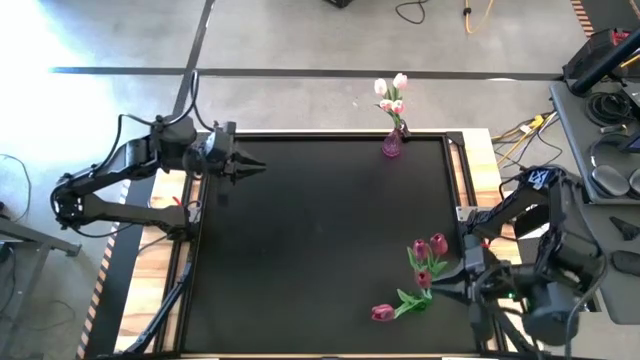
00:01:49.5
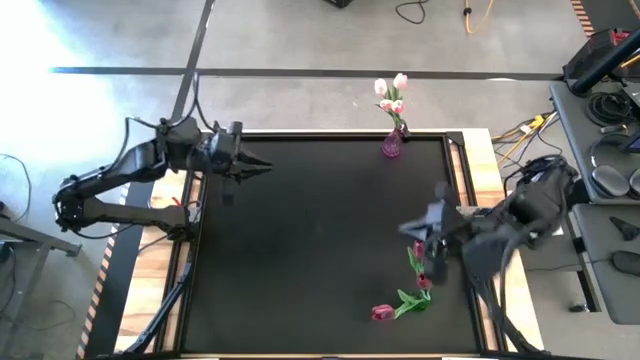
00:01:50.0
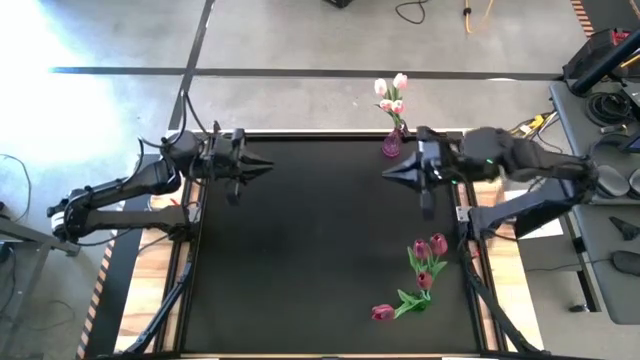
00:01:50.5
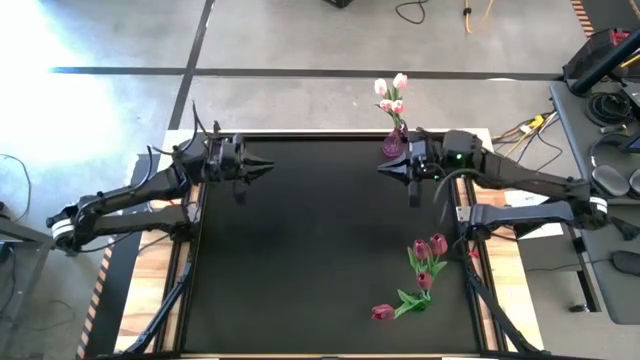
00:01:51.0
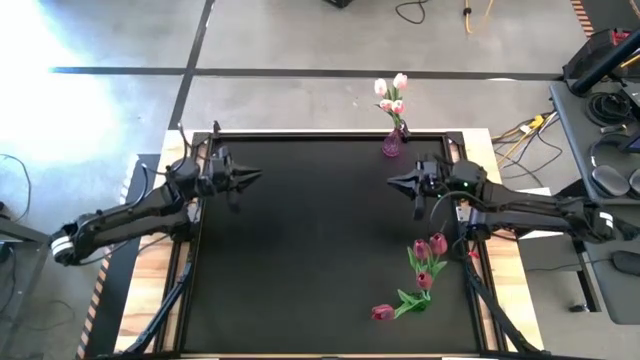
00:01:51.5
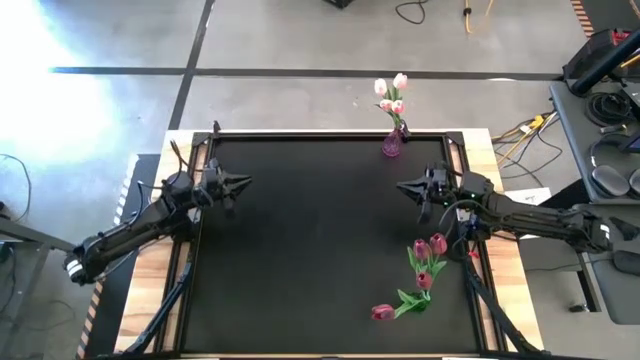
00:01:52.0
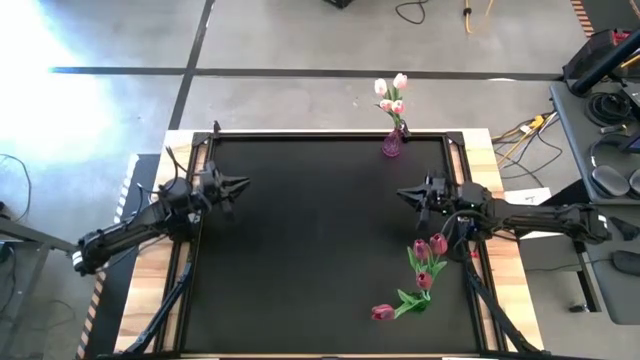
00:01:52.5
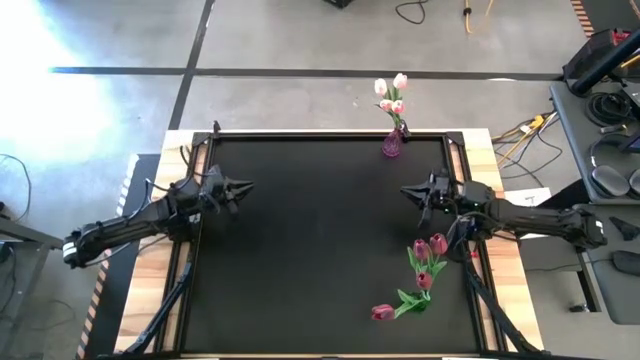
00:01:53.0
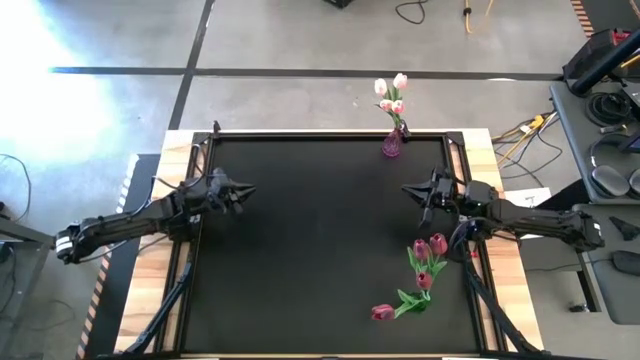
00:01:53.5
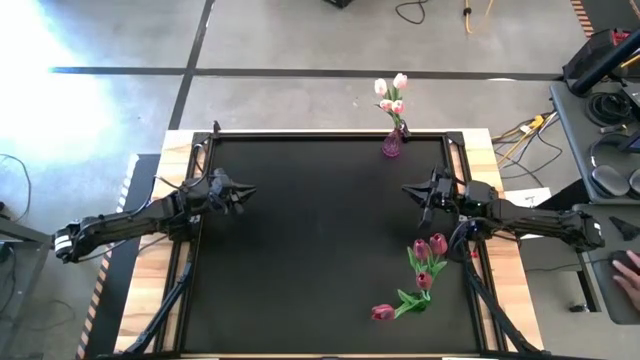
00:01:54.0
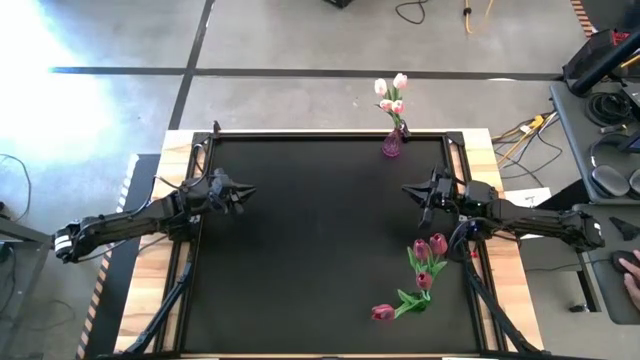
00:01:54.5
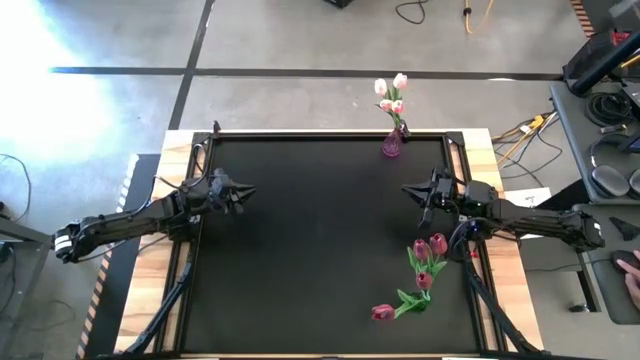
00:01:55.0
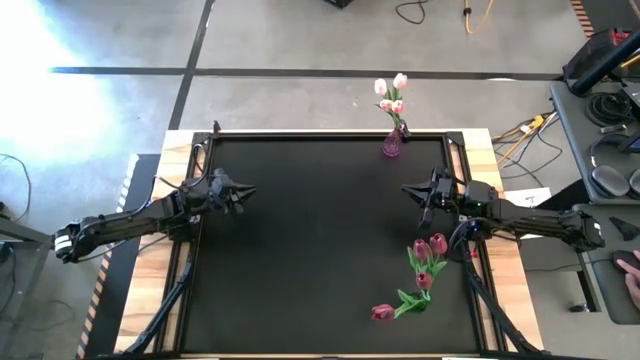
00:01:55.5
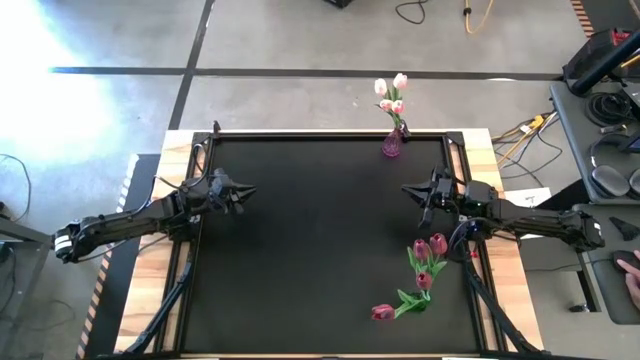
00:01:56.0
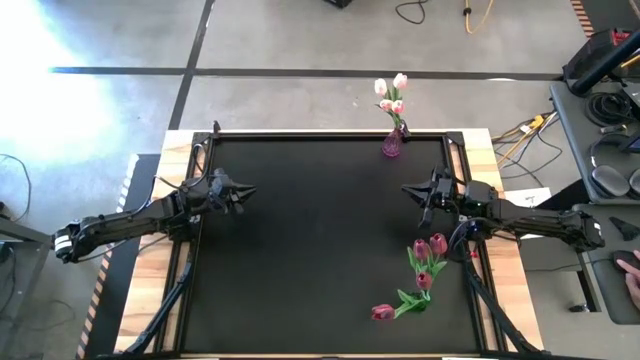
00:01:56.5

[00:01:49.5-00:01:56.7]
Task: Sort flowers into vase by color
Return to Home Position

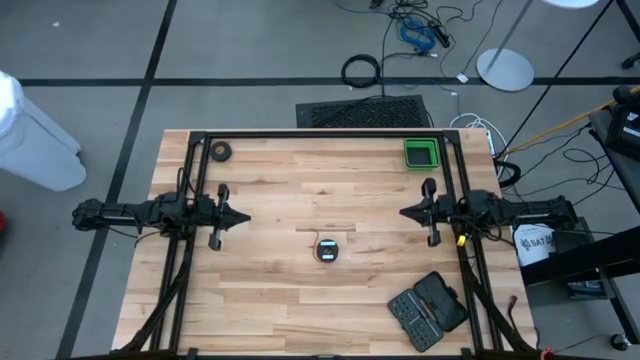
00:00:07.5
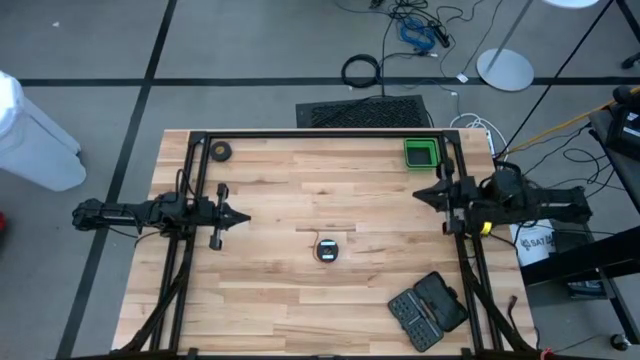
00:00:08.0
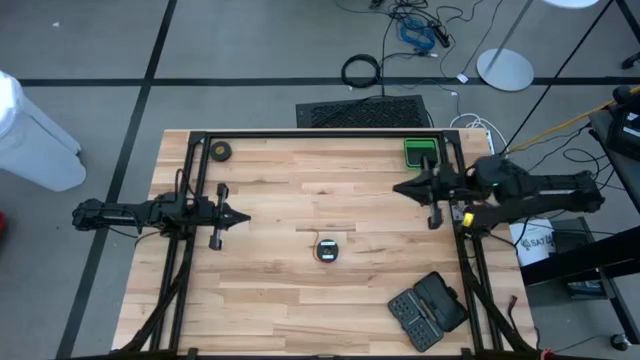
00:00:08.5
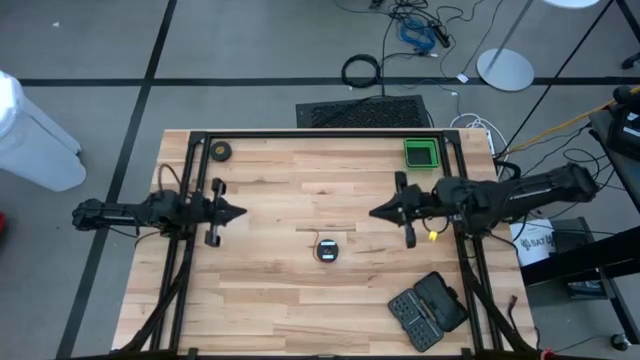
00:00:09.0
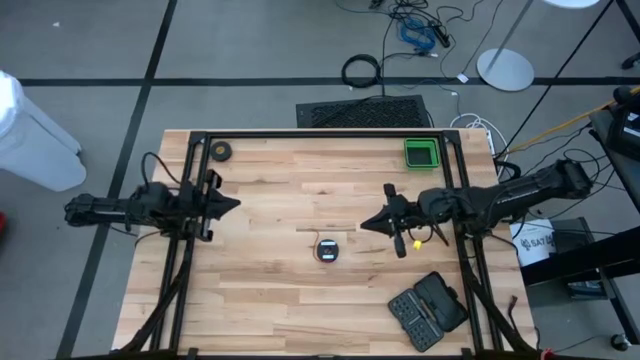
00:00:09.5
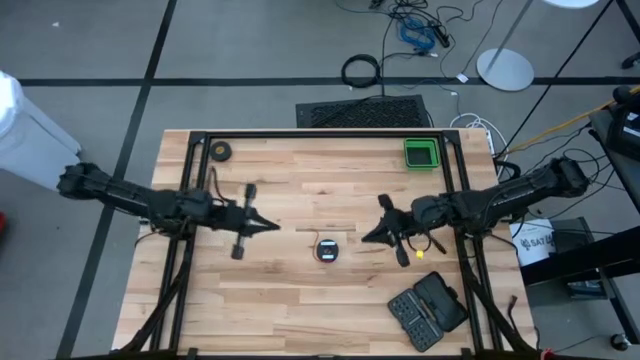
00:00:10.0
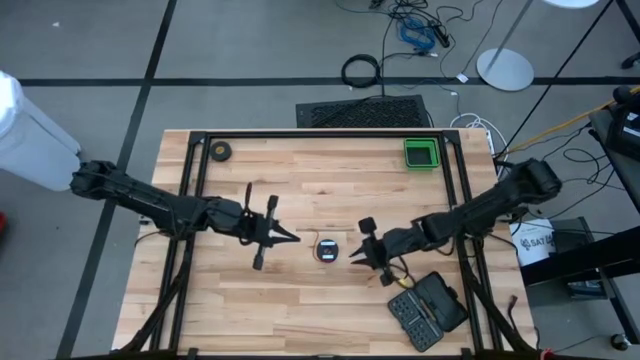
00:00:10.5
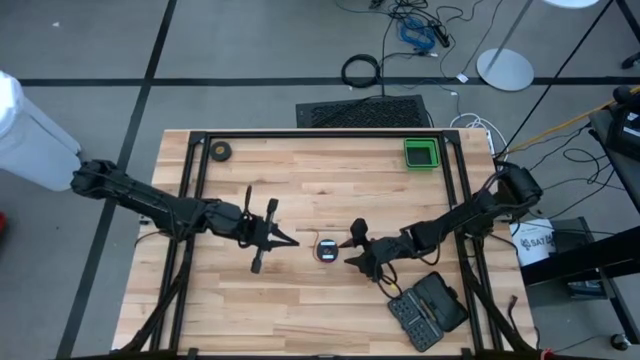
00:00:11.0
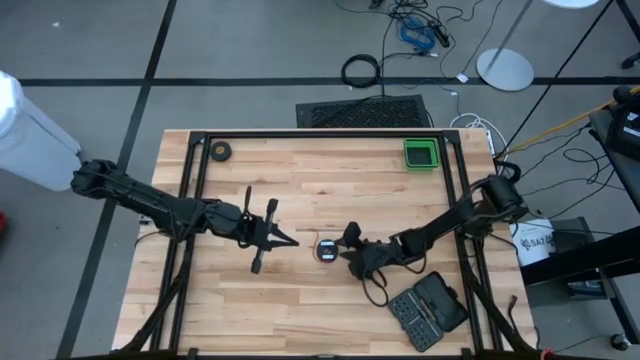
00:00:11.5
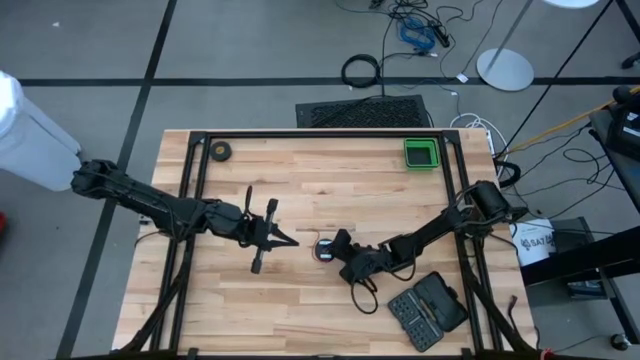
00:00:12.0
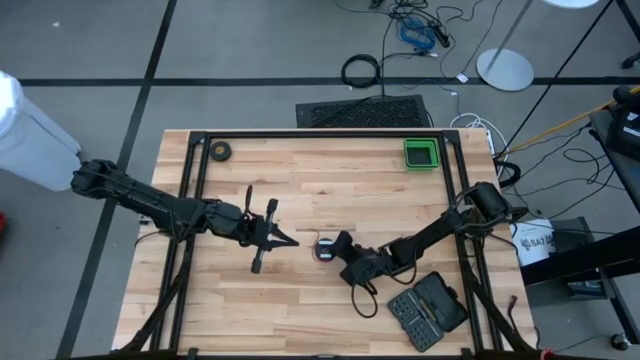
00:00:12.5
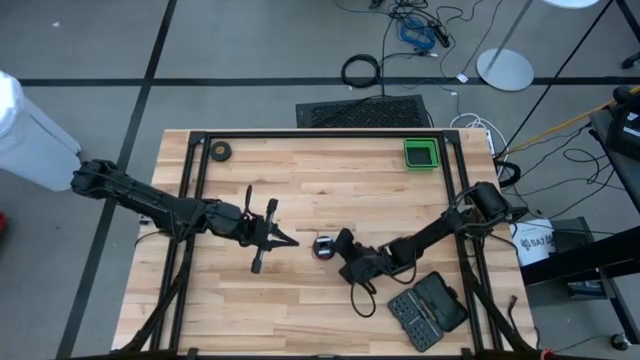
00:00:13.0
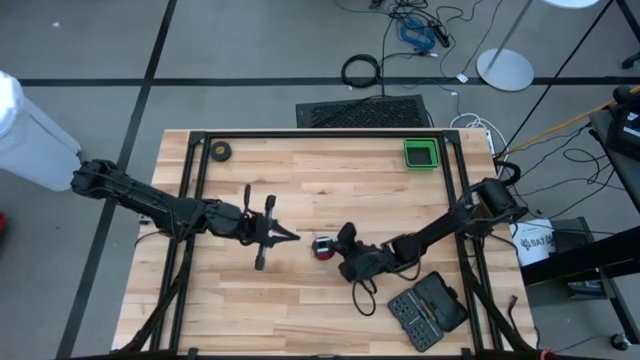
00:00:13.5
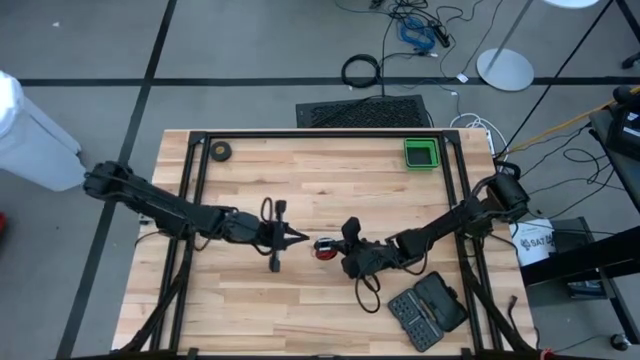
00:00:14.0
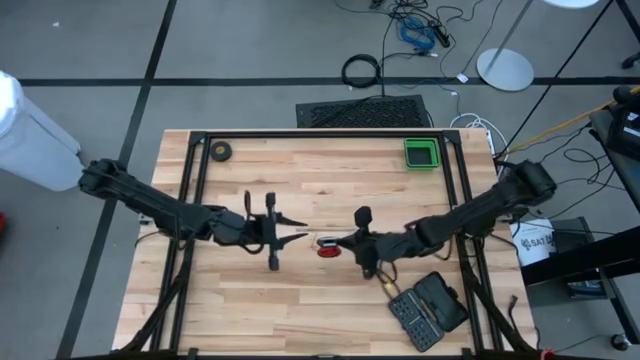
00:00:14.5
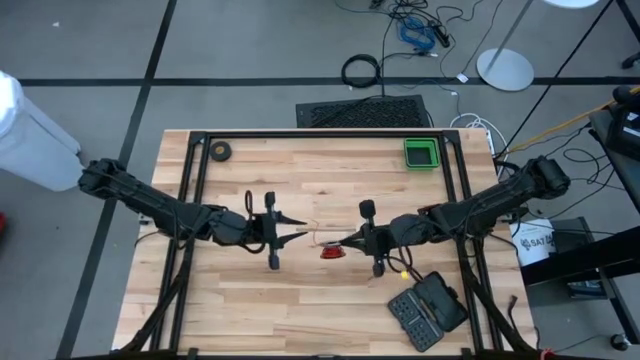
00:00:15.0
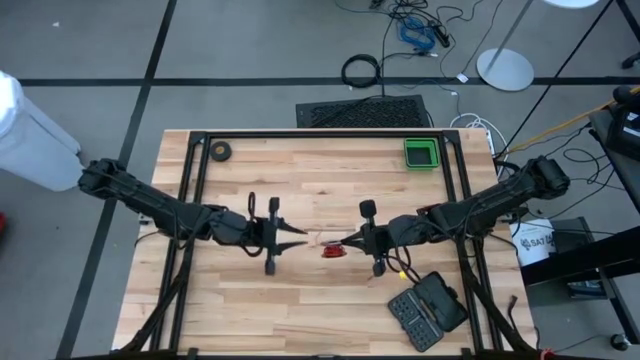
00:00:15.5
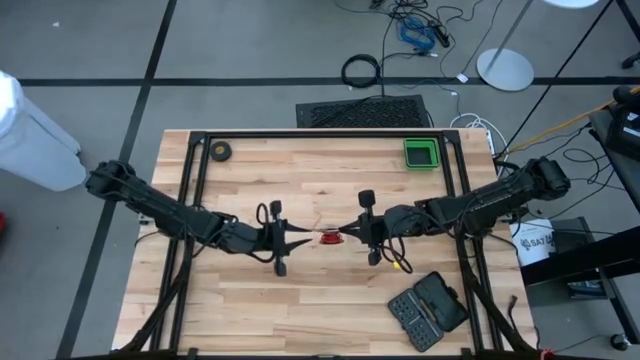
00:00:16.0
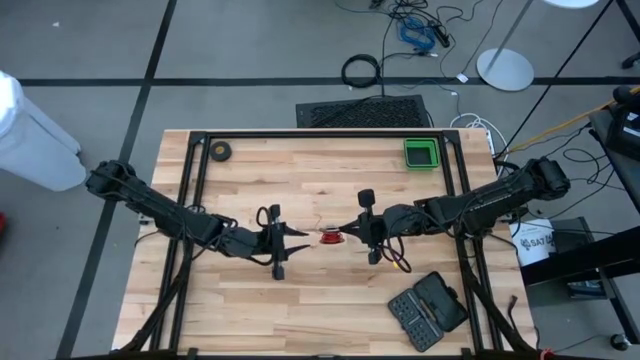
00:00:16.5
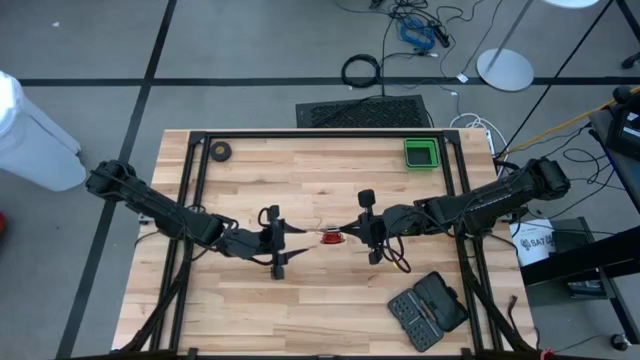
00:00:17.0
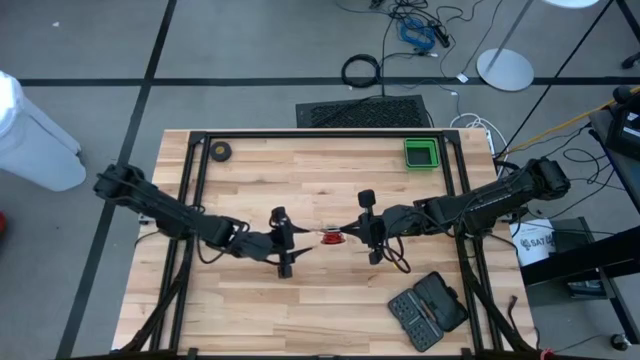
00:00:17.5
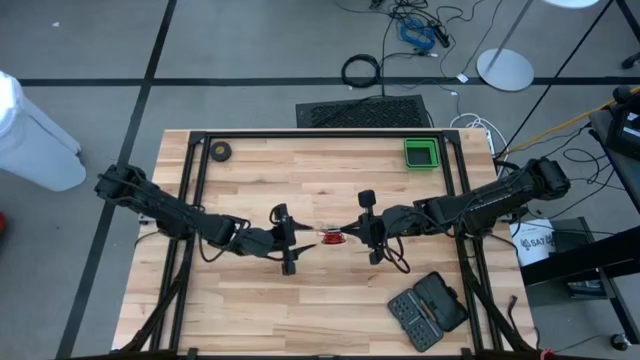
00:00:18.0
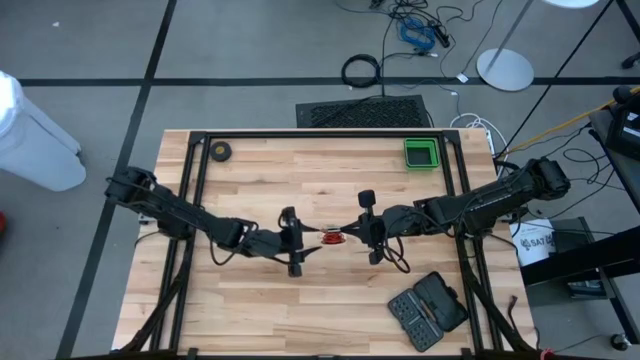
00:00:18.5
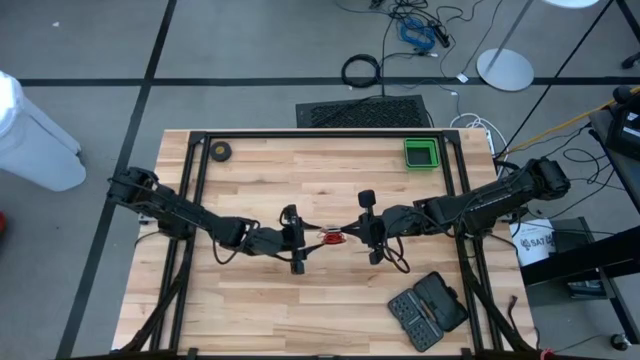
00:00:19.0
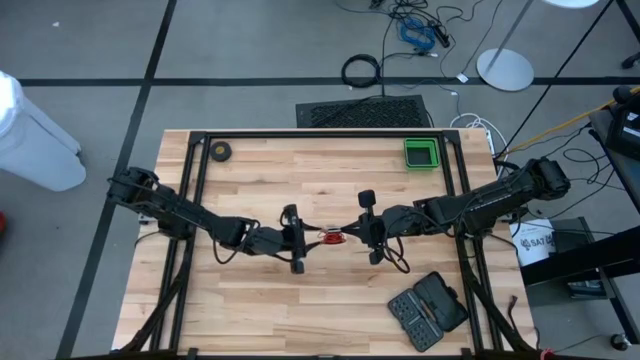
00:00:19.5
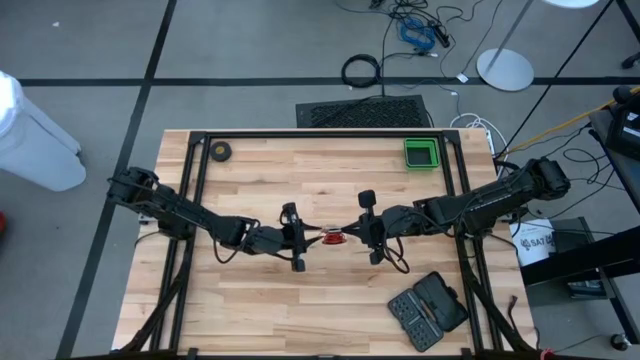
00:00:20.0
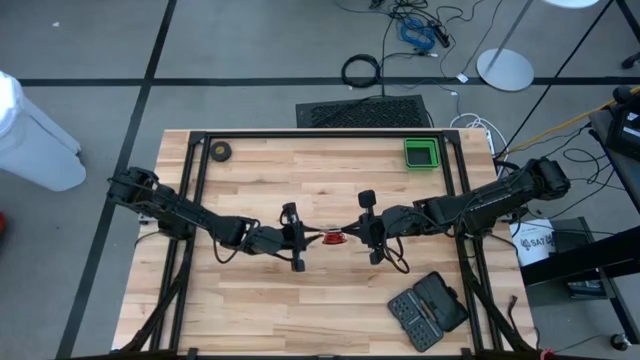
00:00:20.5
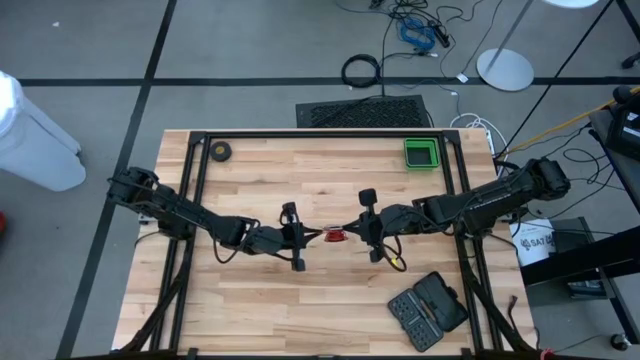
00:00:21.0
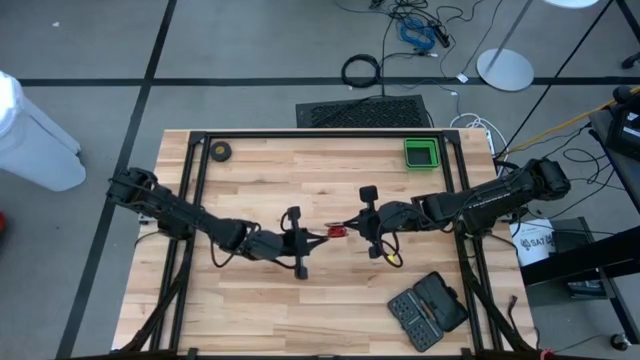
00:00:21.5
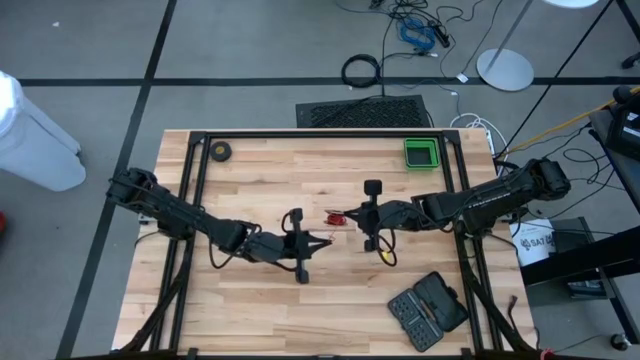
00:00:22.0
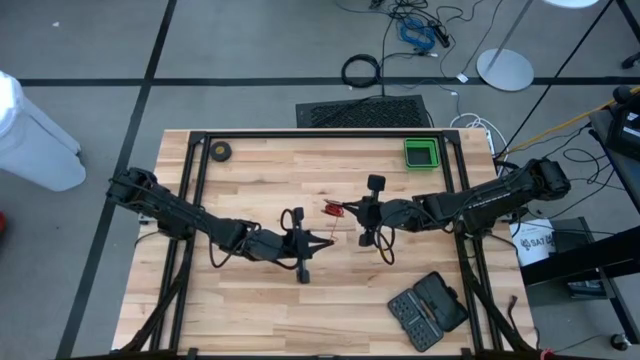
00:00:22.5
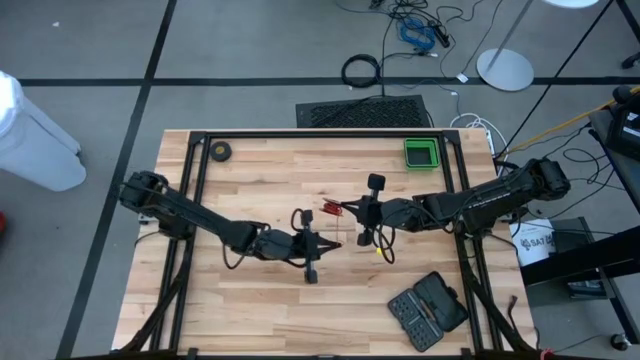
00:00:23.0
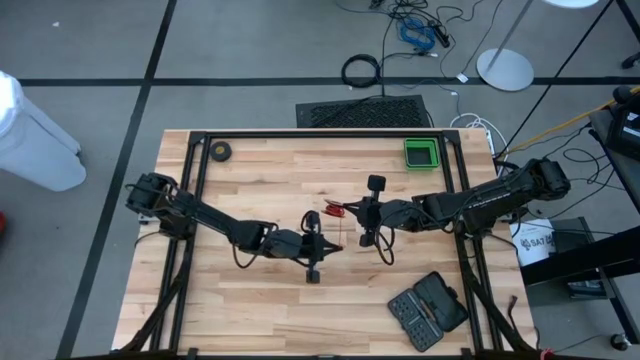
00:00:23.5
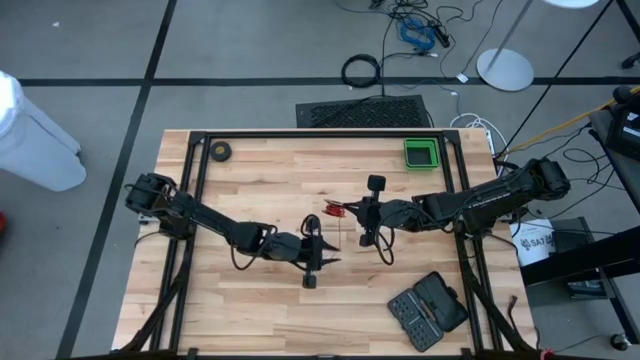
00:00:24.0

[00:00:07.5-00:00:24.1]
Task: Coil cords
Uncoil the red wire from the spool
